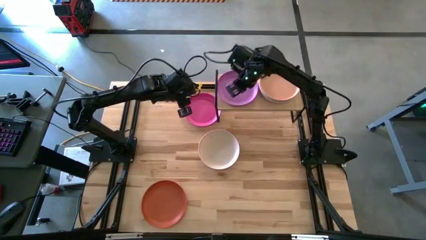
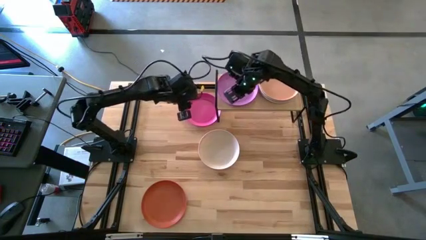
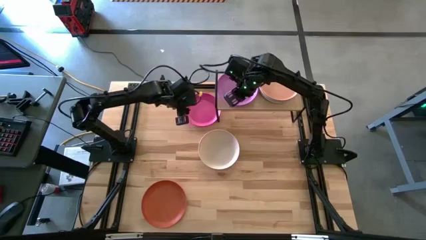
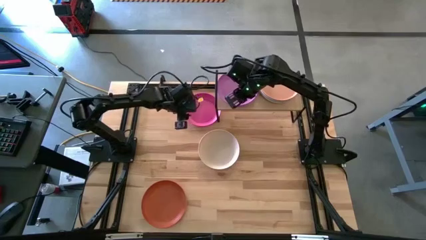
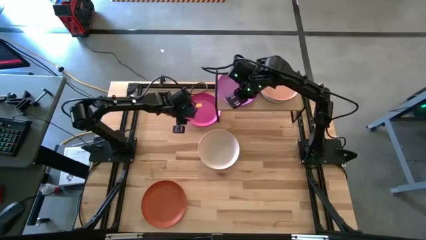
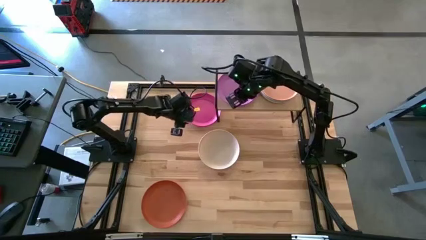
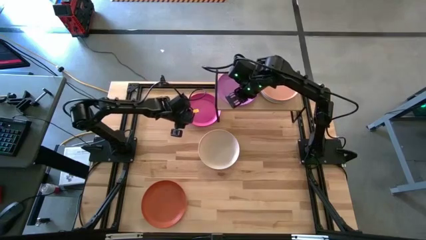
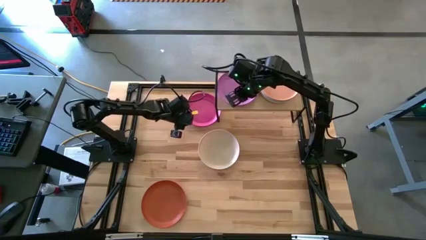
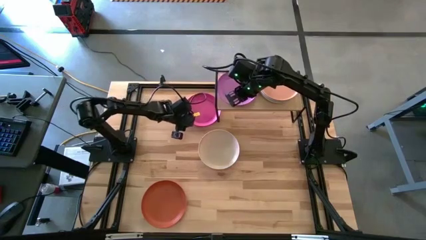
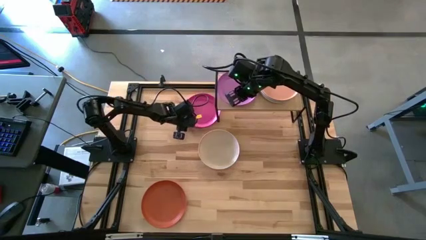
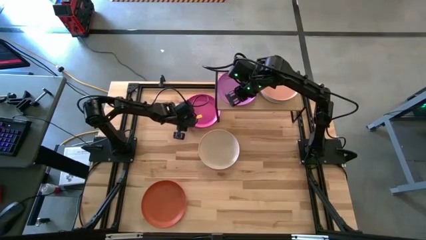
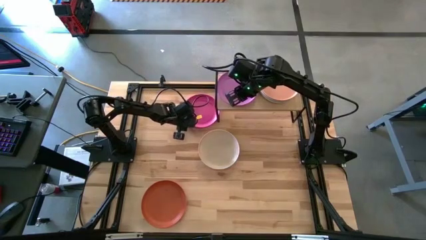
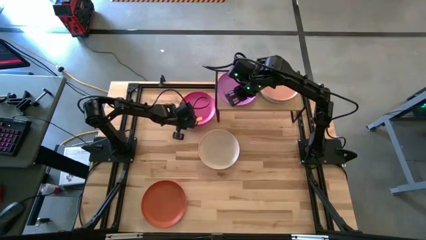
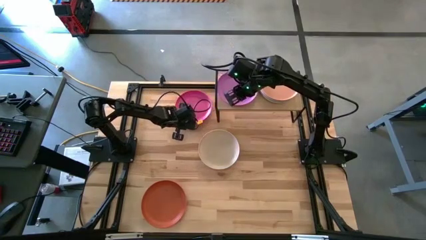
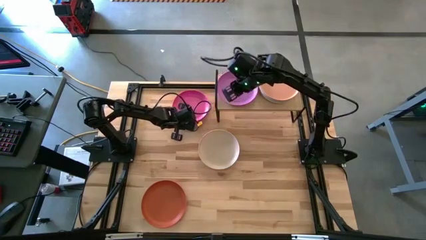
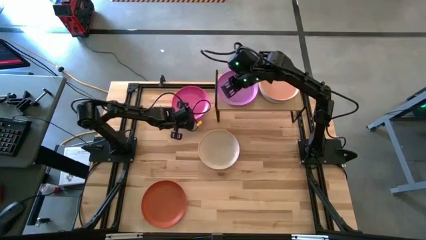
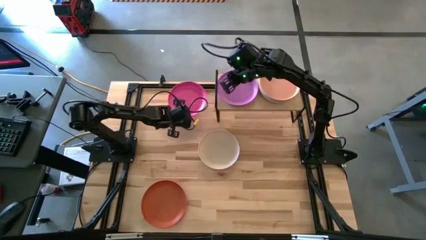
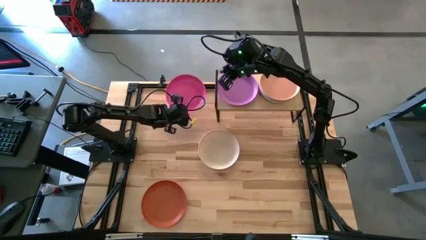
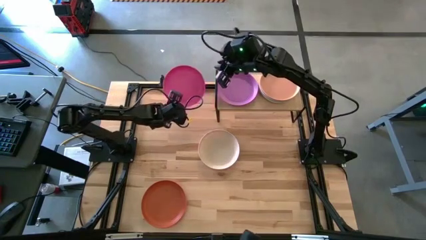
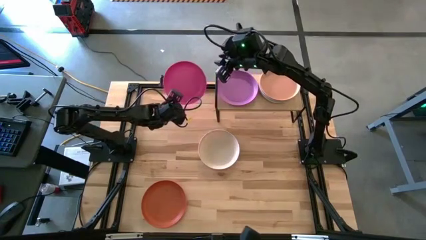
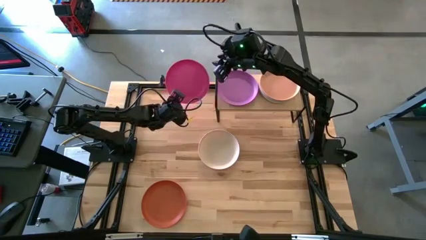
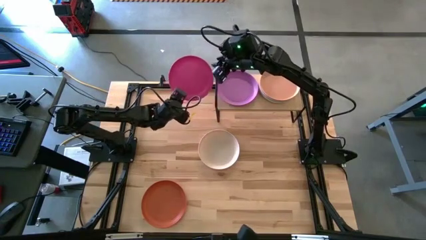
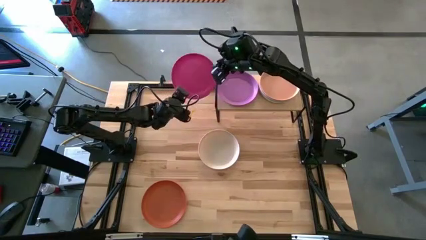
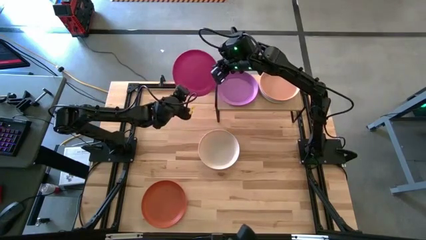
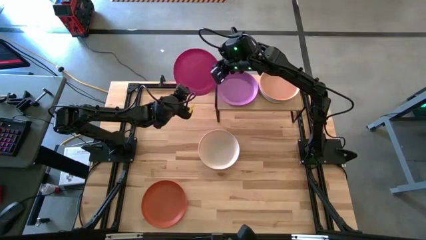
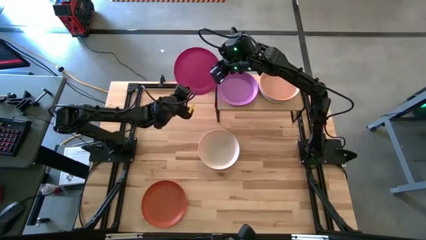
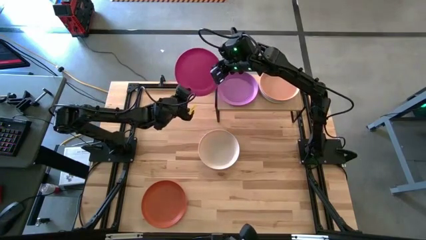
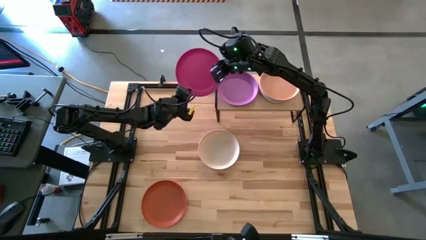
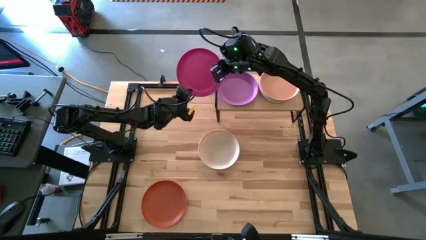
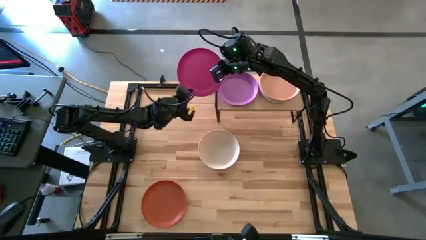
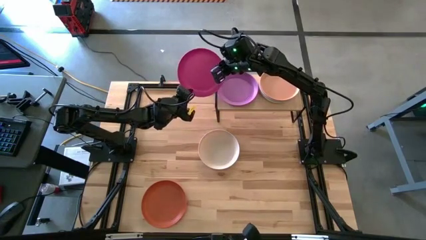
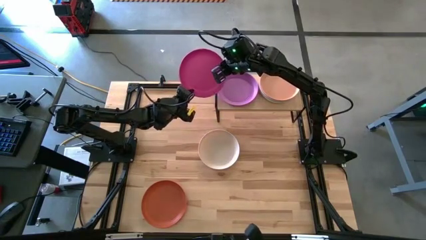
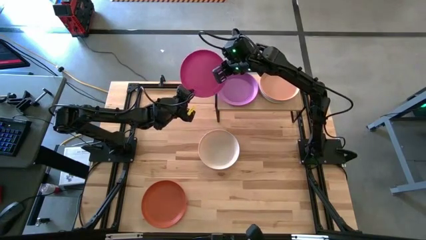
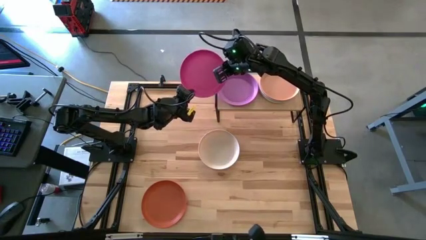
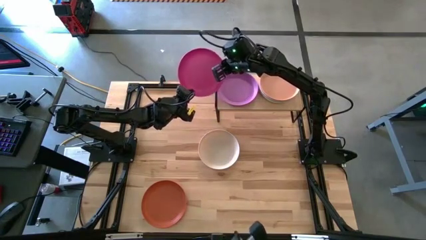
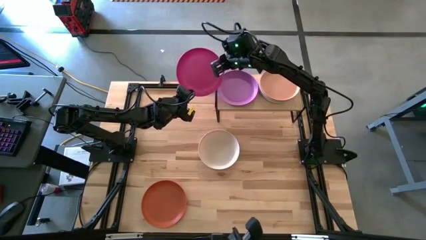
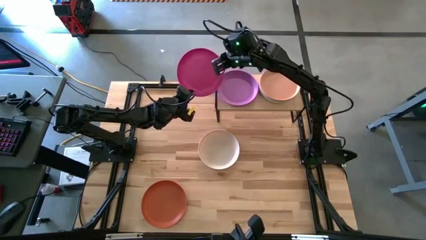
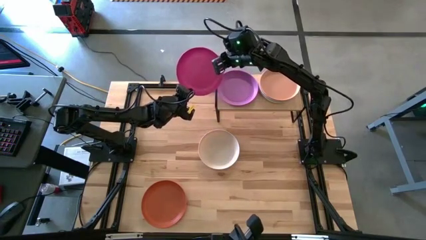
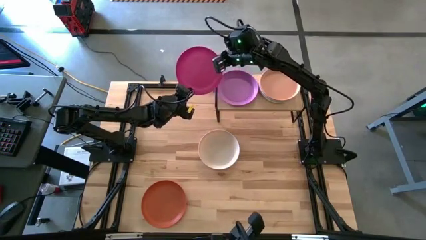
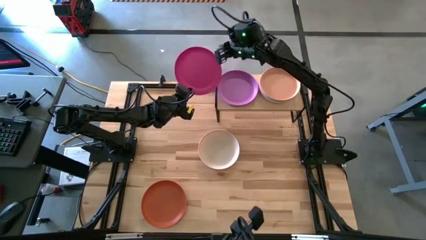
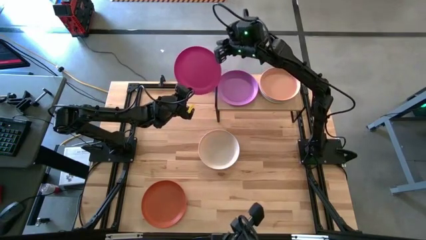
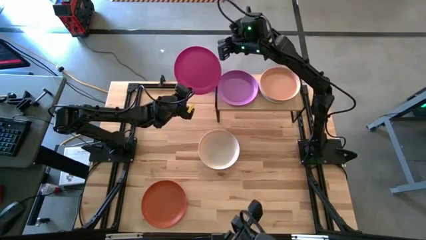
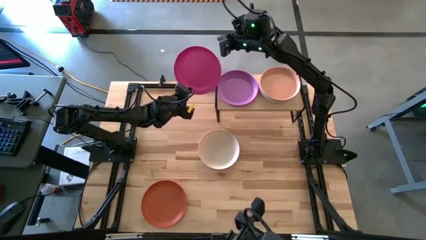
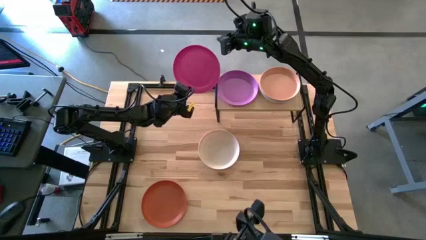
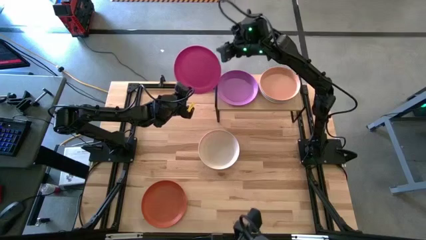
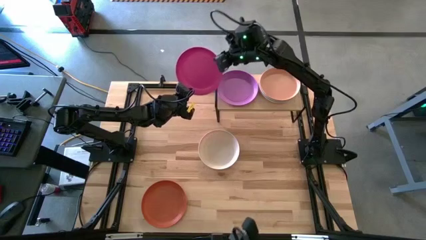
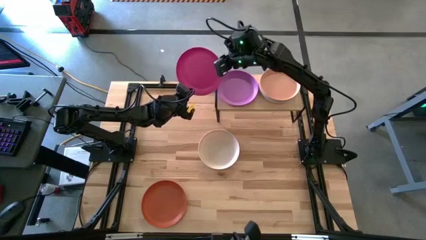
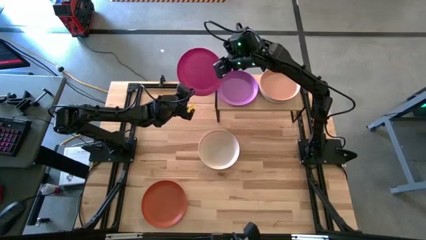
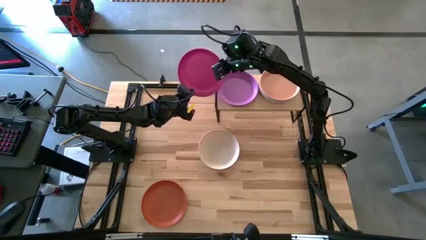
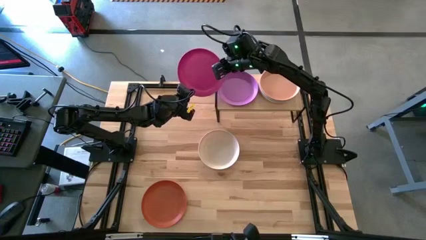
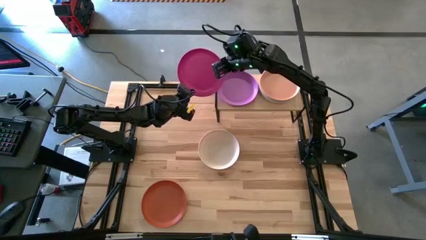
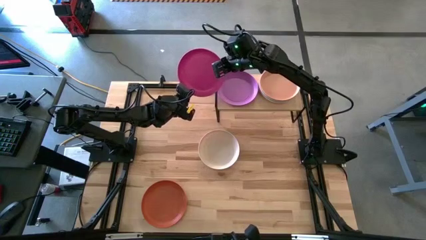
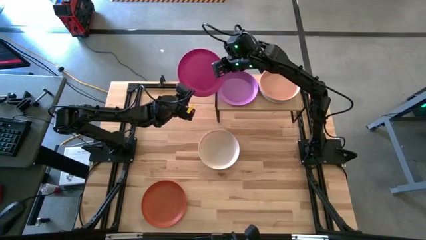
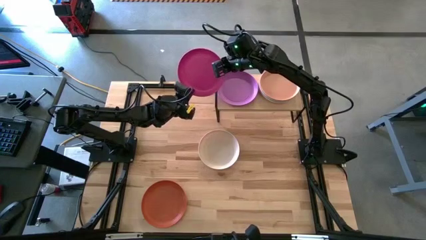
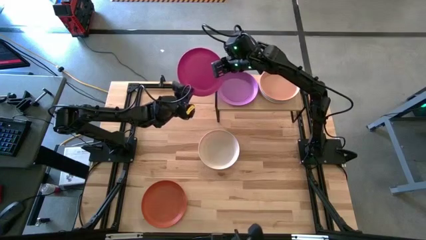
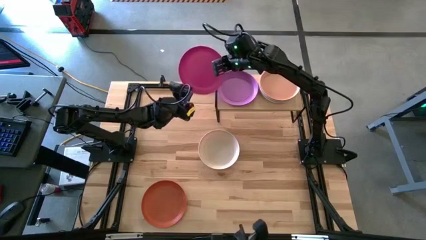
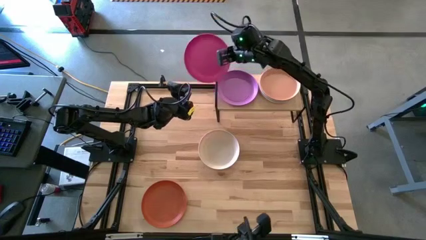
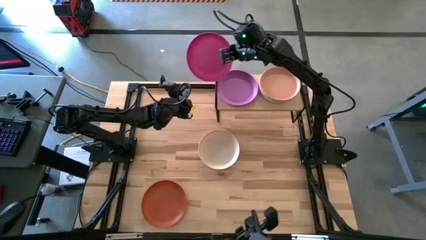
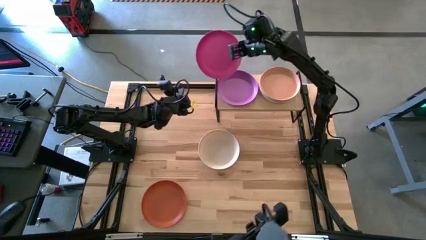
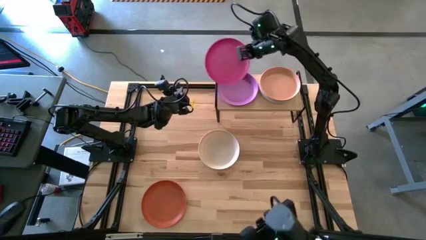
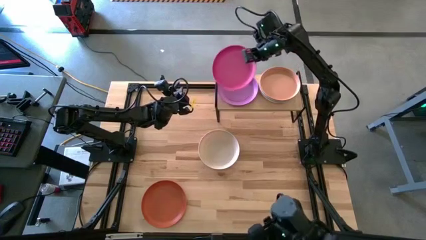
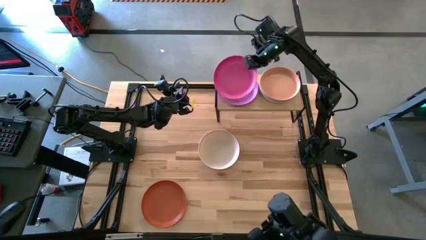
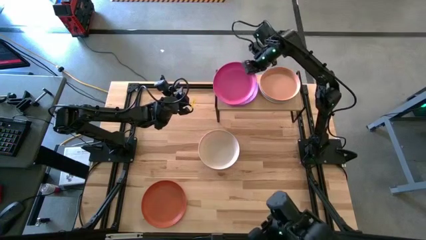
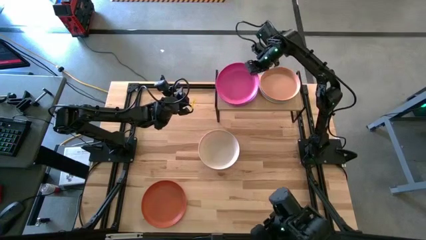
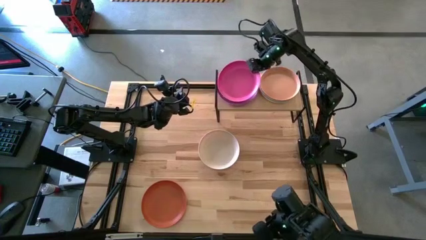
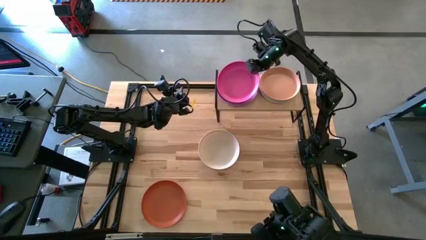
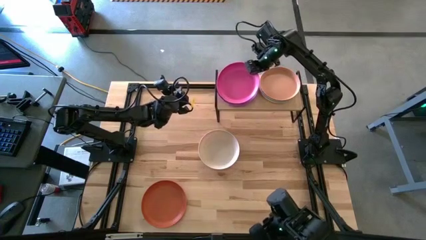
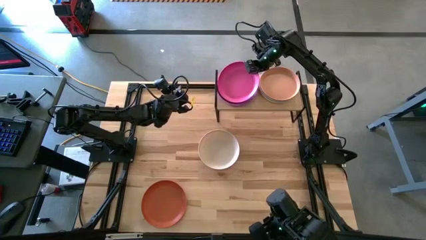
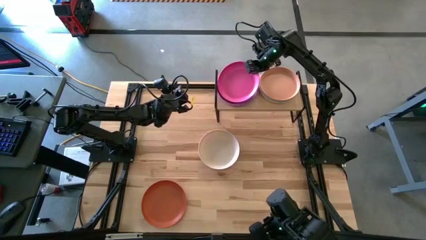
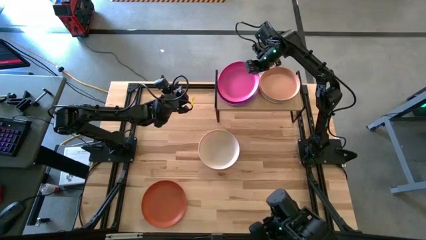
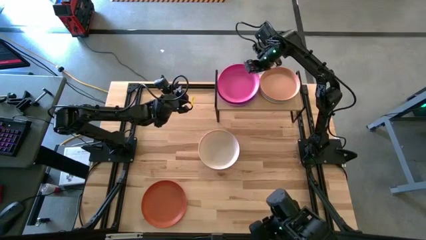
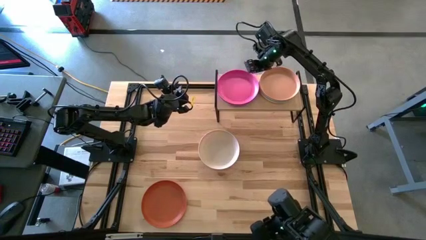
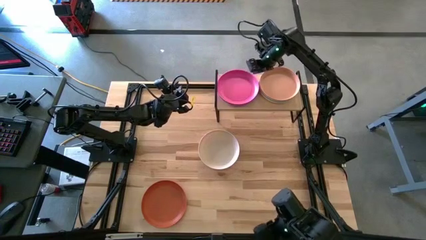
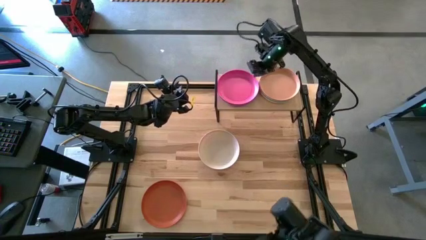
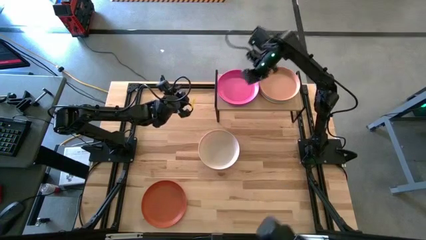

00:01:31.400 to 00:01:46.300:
Task: Place and stack plates onto a shelf
Stack the pink plate on top of the violet plate

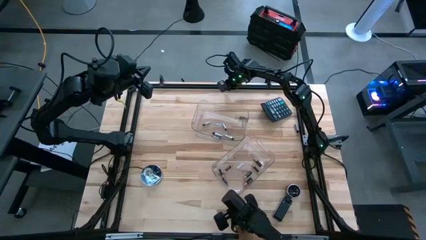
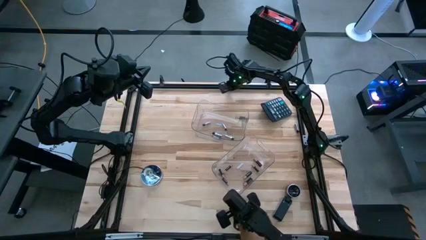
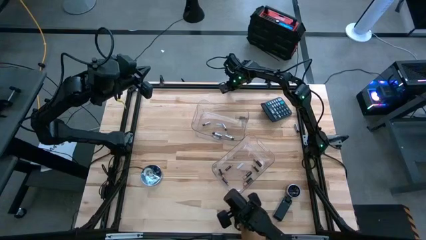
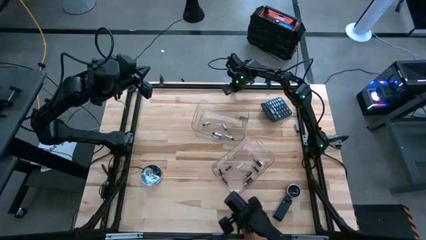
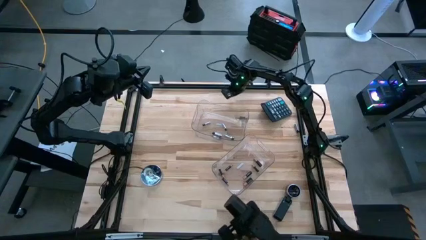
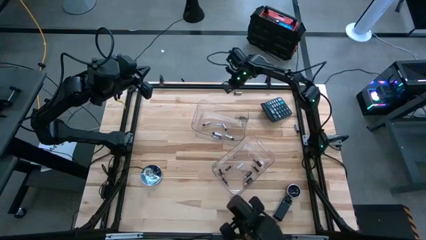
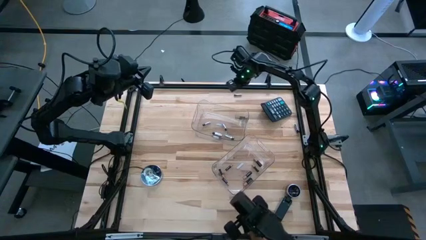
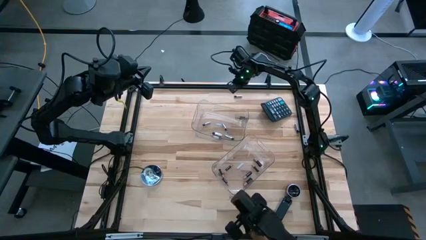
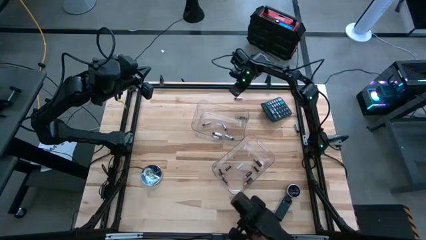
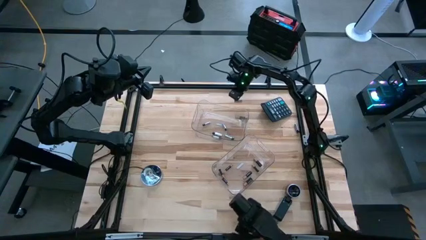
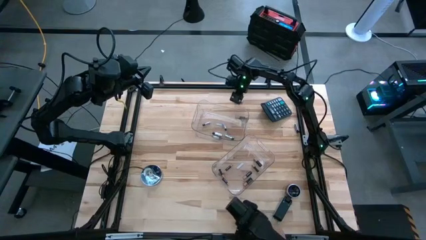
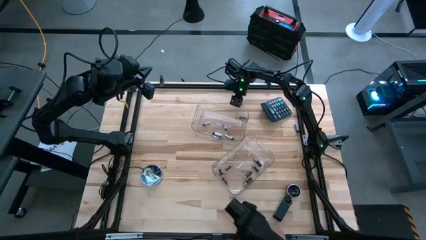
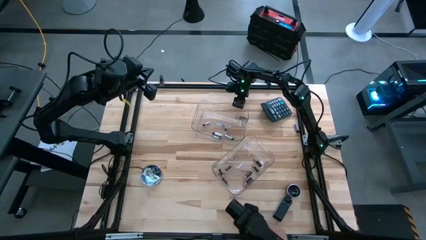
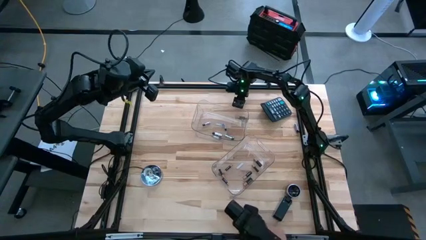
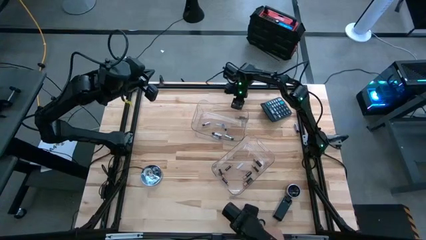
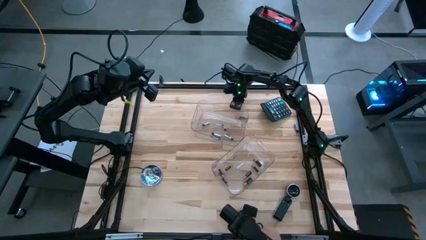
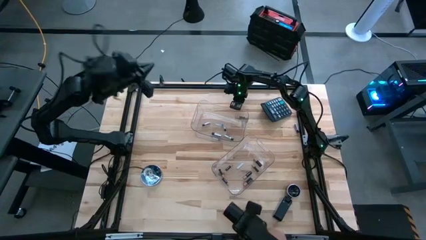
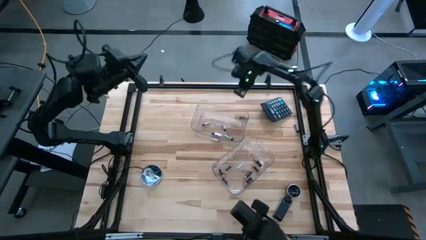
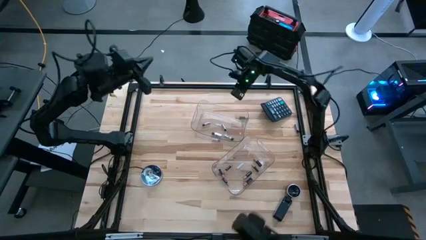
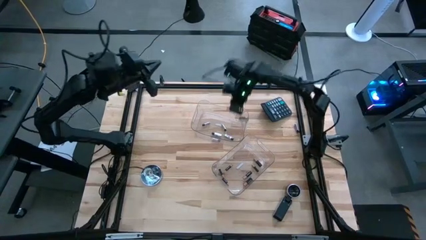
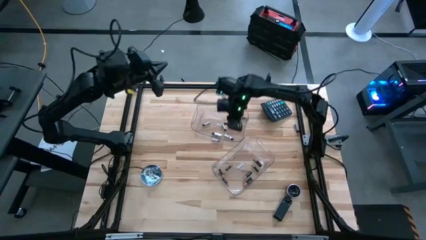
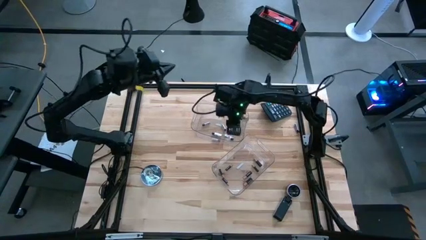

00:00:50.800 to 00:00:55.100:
Task: Sort batteries
Put the silver battery into the top transparent bin
